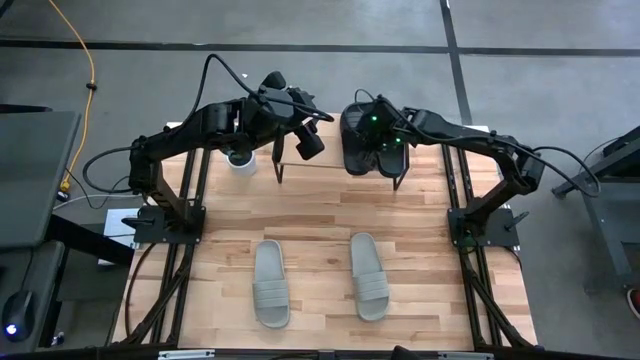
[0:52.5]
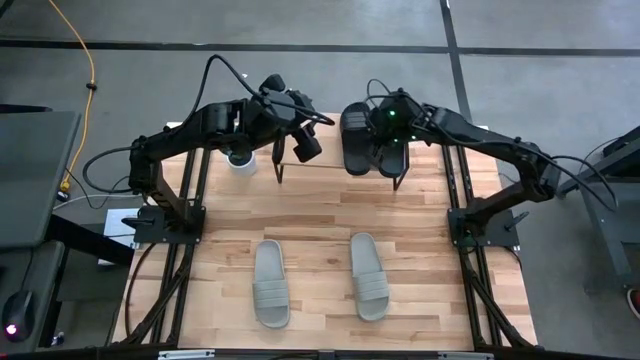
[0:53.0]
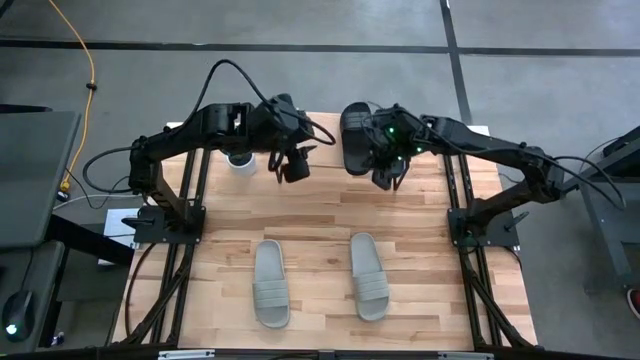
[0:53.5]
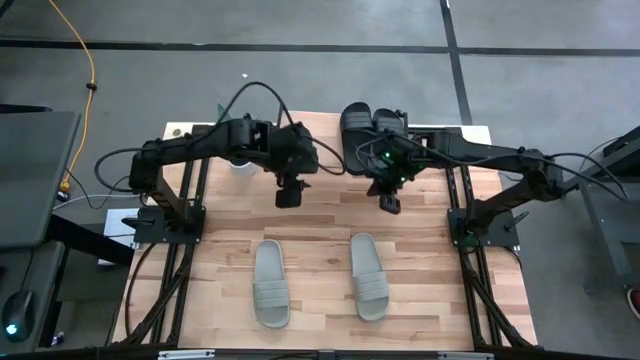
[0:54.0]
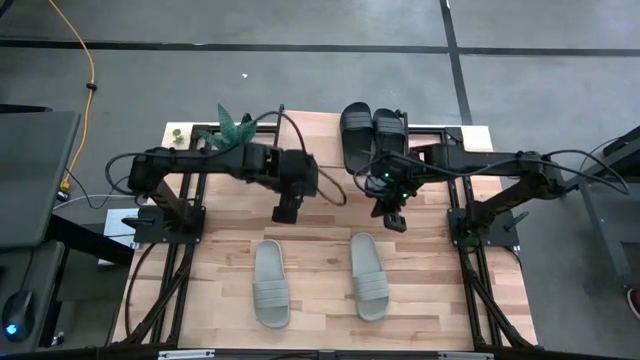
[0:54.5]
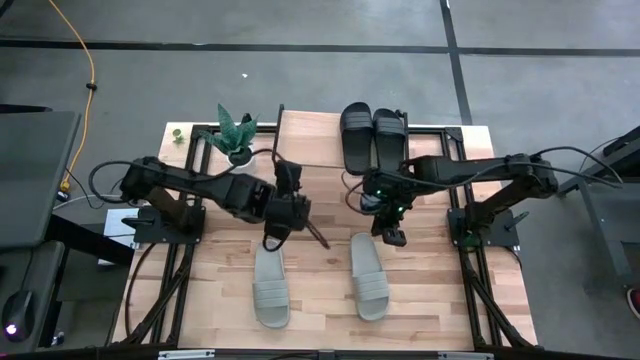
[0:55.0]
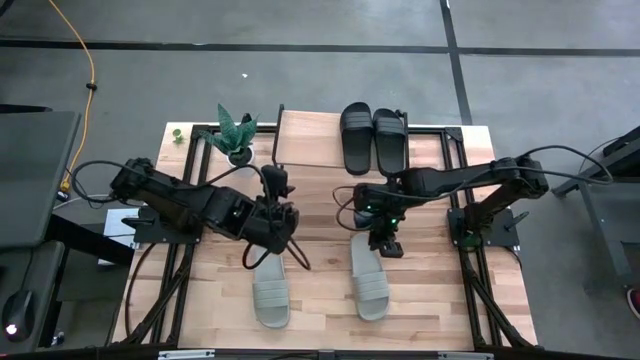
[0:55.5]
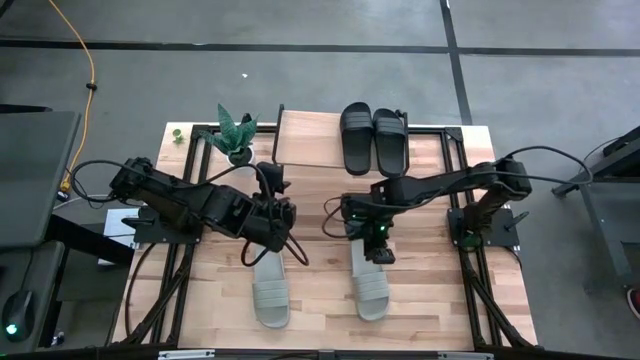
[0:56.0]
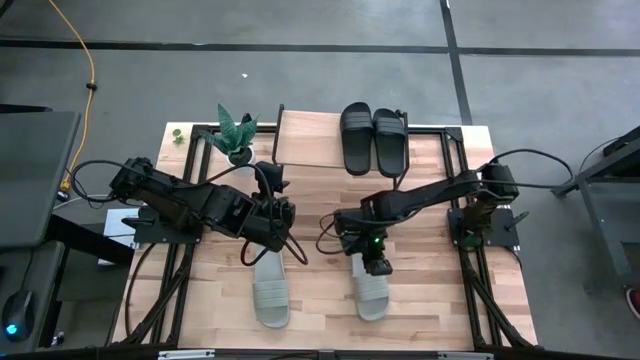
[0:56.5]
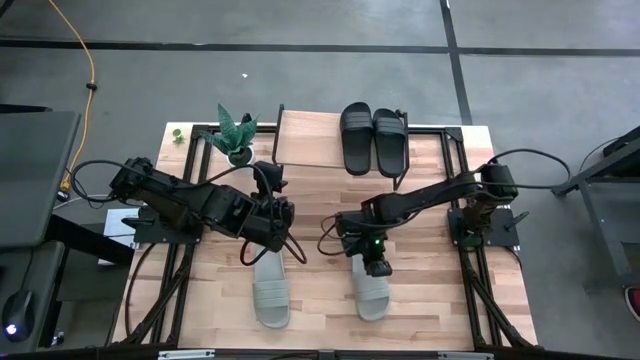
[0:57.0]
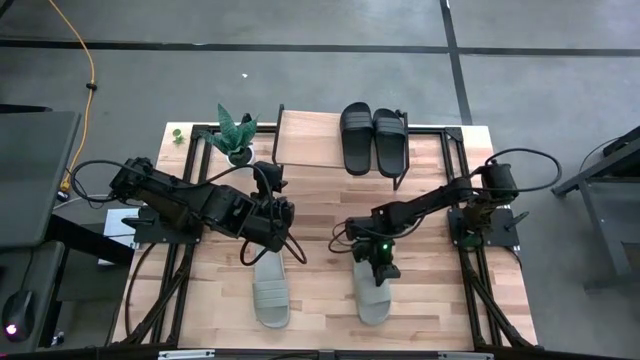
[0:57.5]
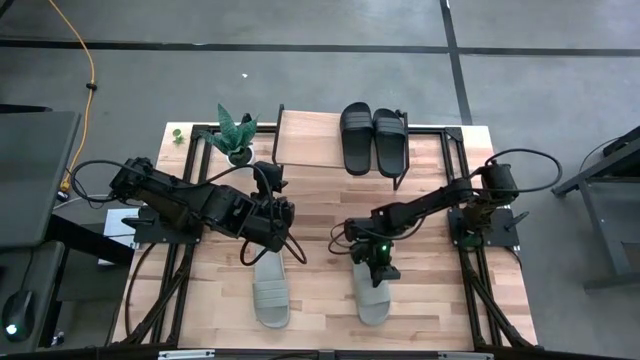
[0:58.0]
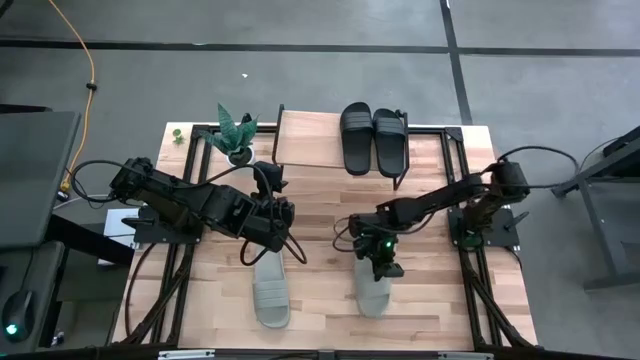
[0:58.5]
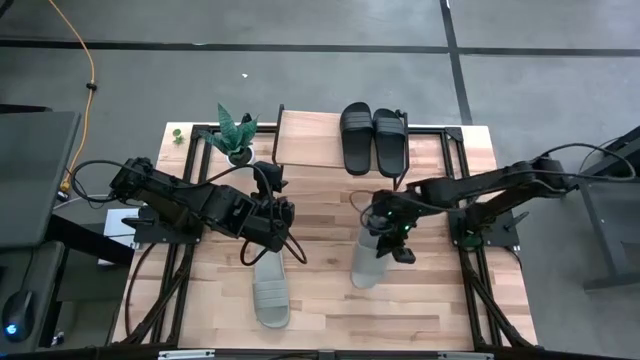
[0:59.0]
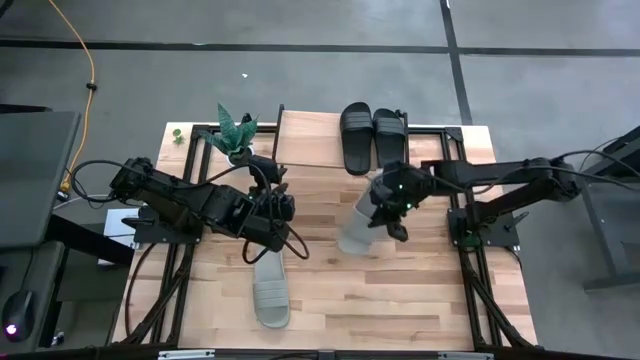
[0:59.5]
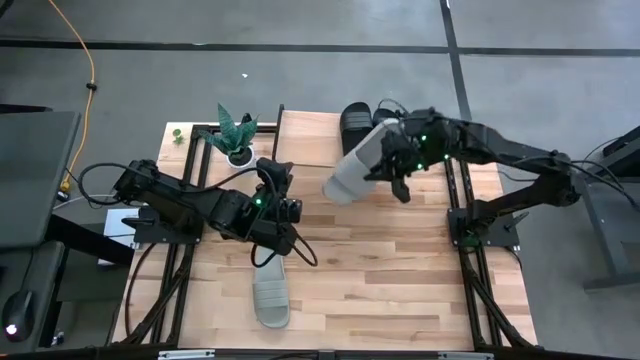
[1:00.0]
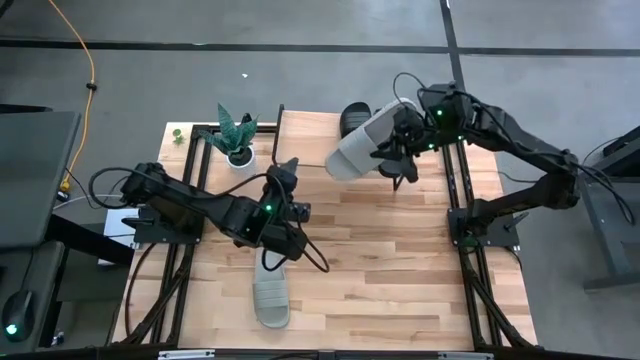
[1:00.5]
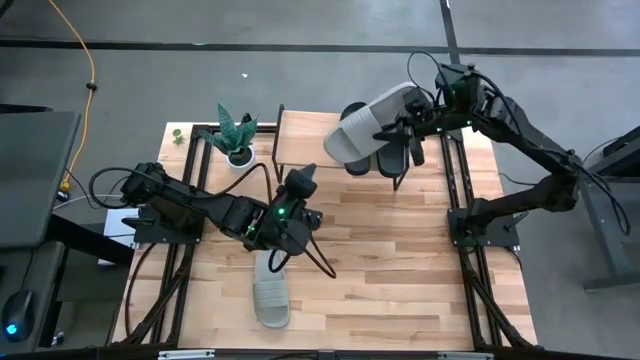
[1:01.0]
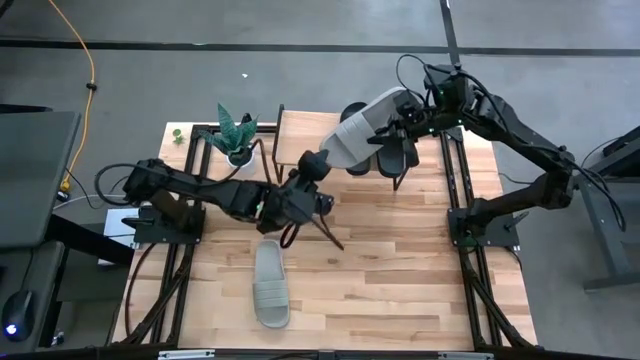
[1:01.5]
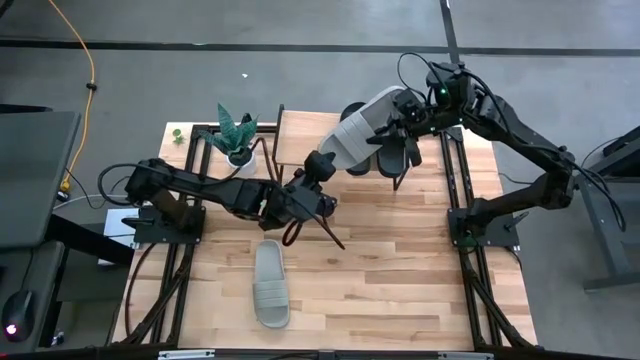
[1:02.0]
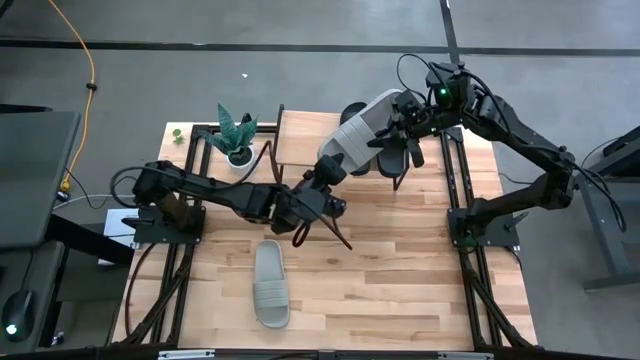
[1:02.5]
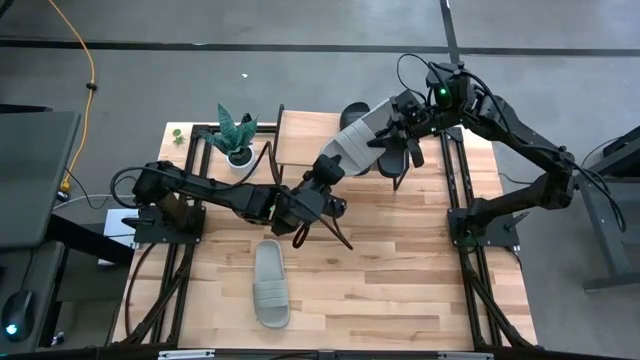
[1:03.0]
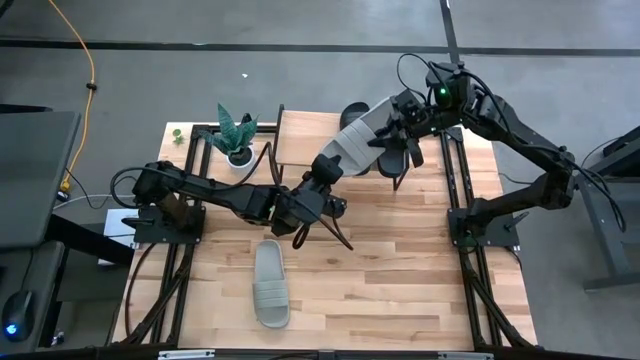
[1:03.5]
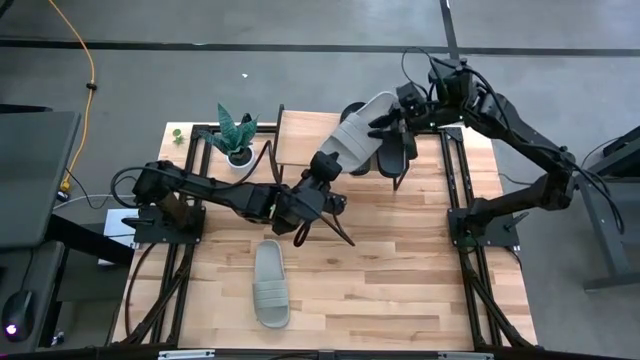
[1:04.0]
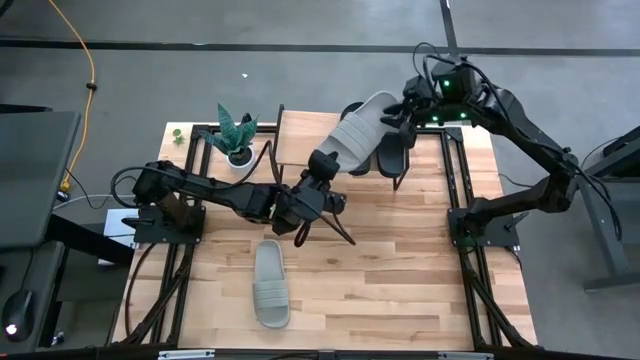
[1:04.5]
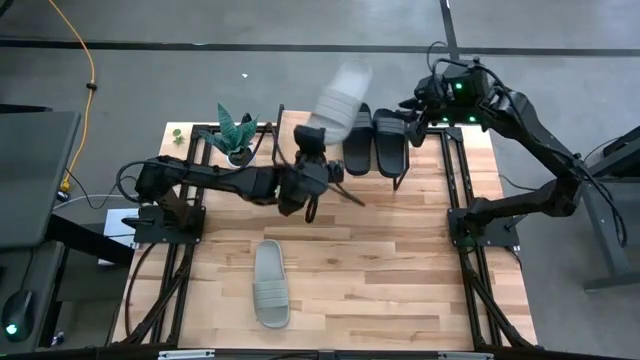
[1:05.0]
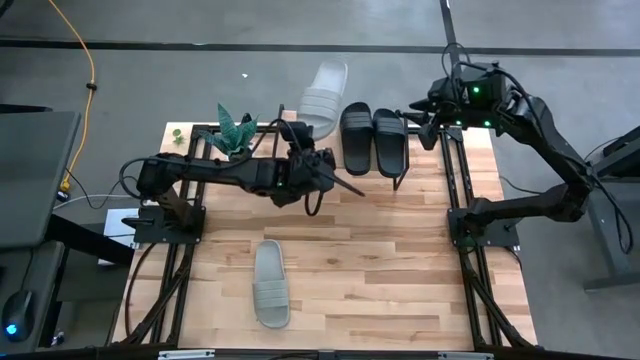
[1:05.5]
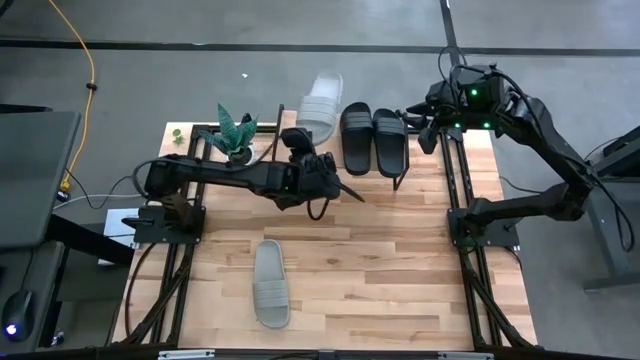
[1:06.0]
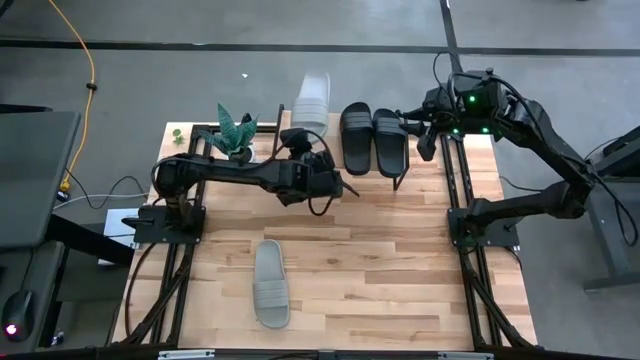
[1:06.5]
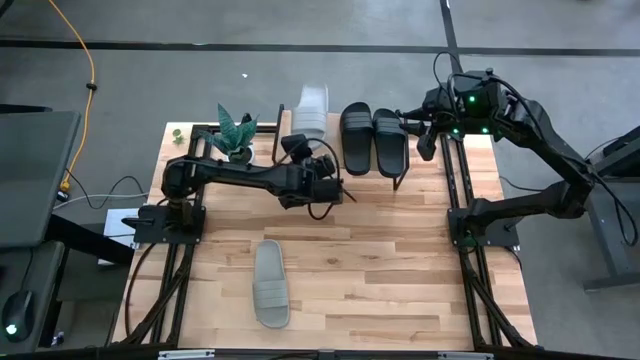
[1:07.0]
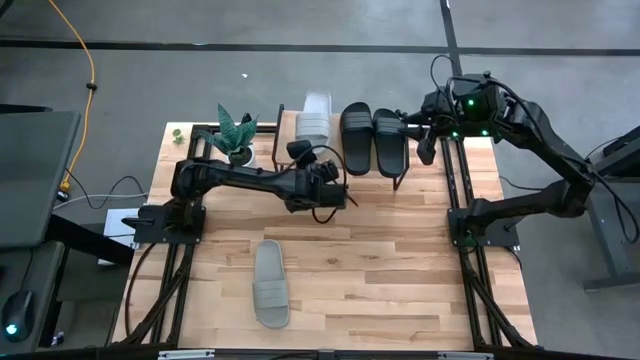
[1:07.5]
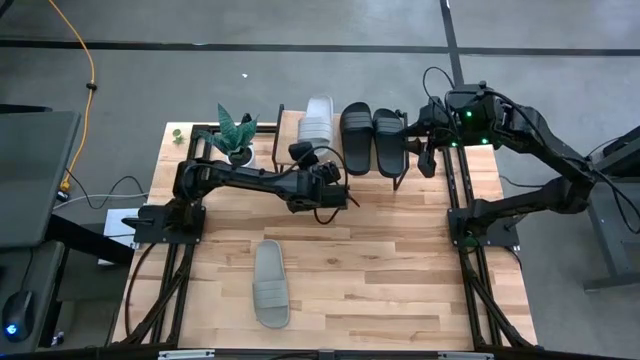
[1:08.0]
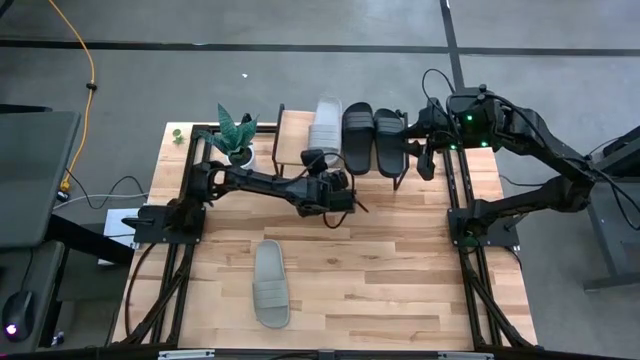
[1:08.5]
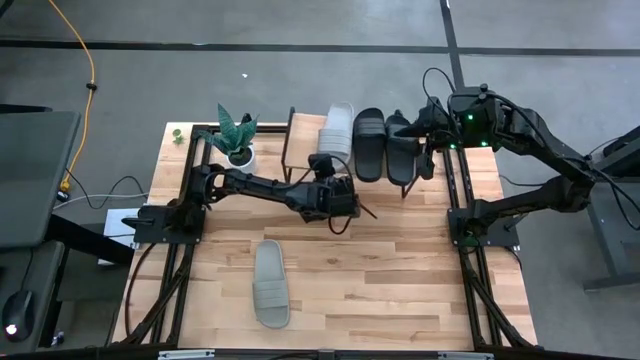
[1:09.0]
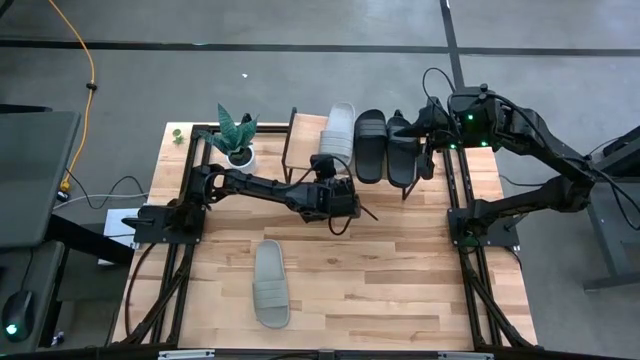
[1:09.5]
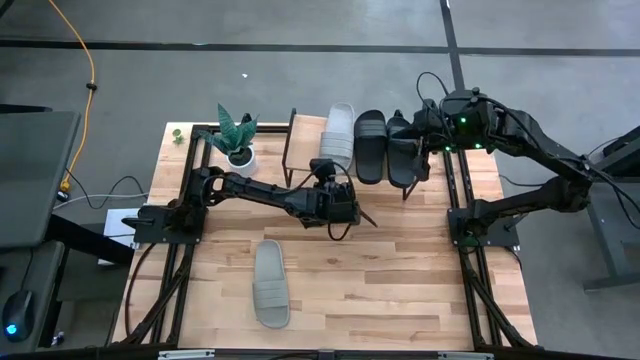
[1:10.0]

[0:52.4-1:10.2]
Task: Pick and place slides into the shelf
Put the right gray slide on the shelf

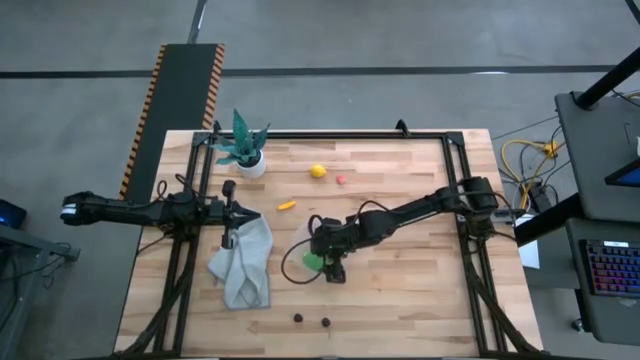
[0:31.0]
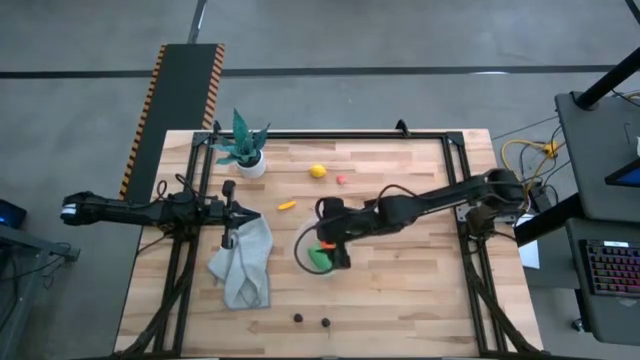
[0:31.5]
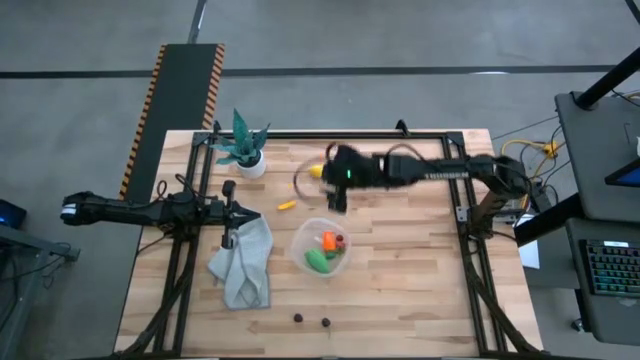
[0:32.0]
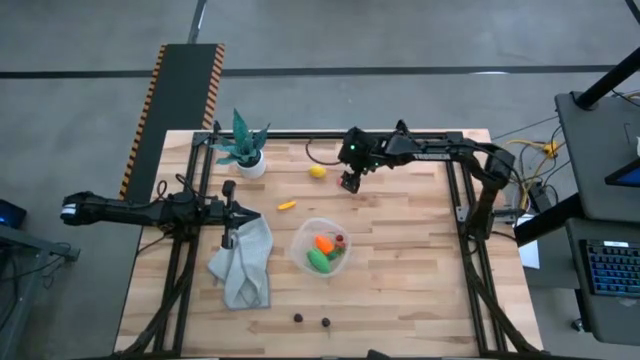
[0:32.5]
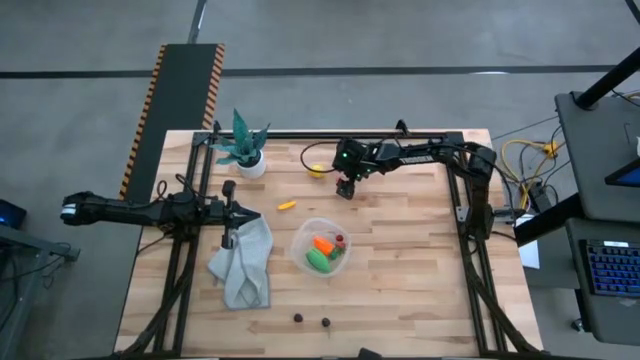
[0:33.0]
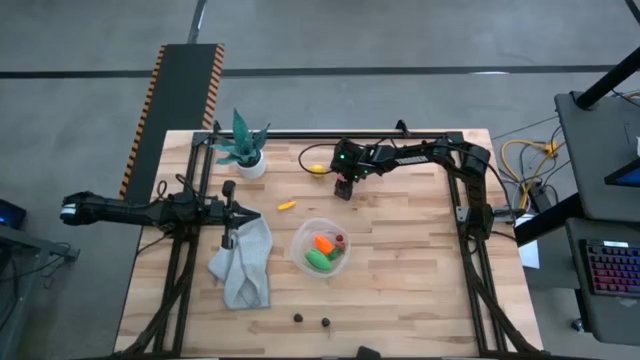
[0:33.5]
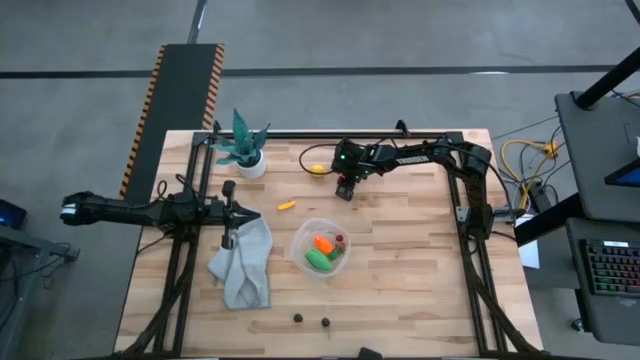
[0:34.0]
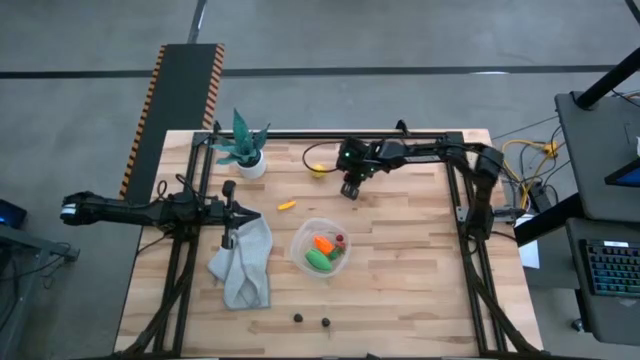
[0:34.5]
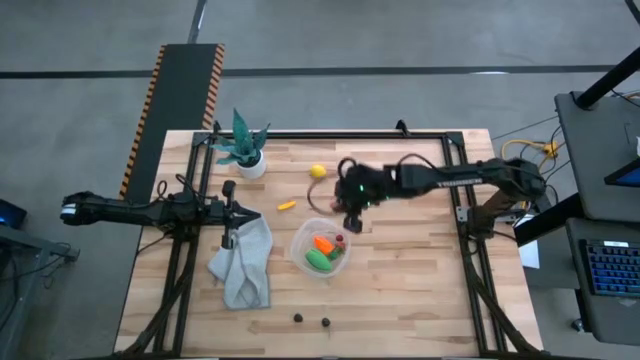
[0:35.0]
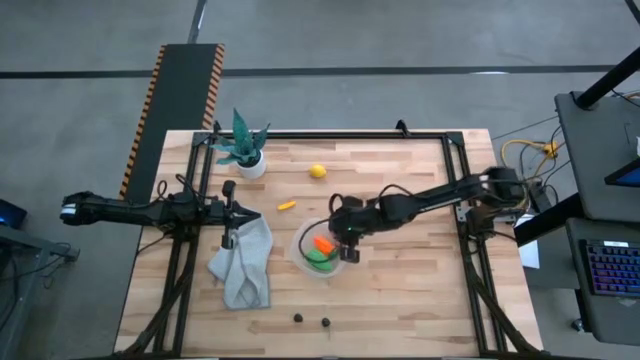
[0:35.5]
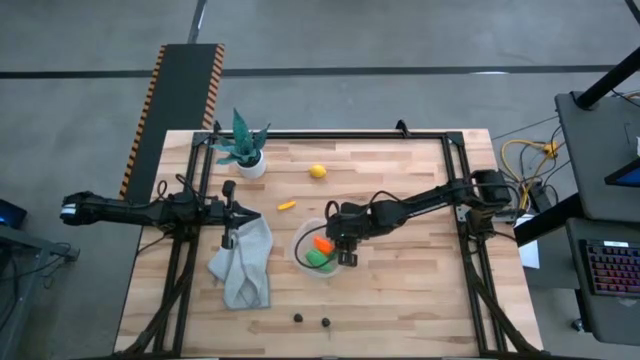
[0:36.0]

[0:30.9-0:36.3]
Task: Pick and placing Produce into tupperware
Put the pink peach into the transparent bin
